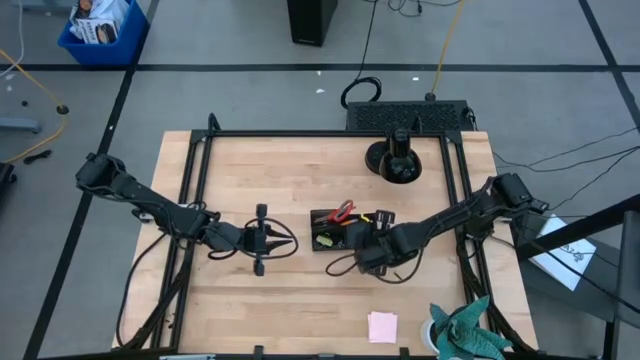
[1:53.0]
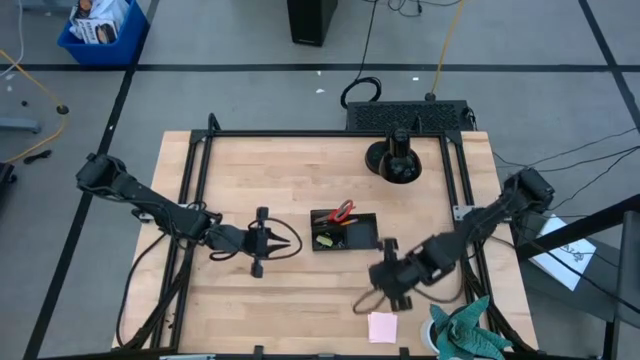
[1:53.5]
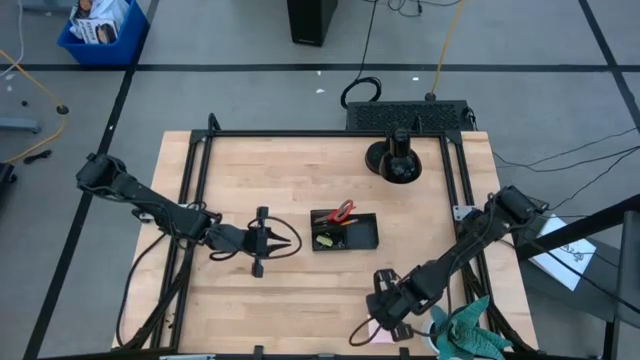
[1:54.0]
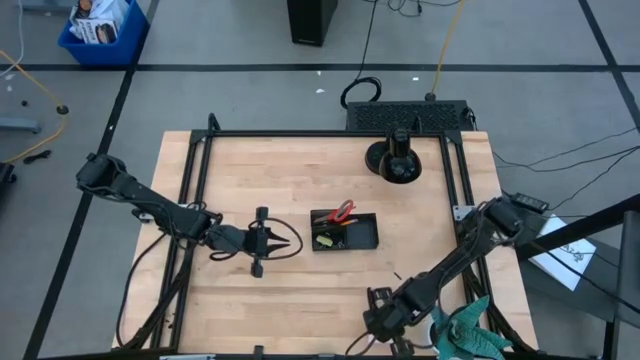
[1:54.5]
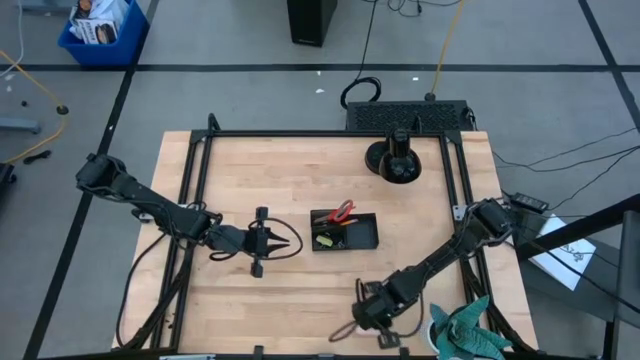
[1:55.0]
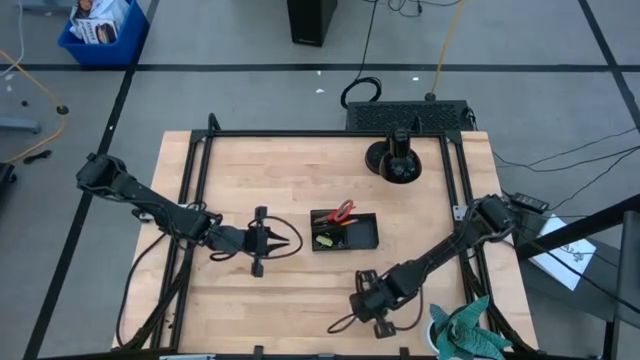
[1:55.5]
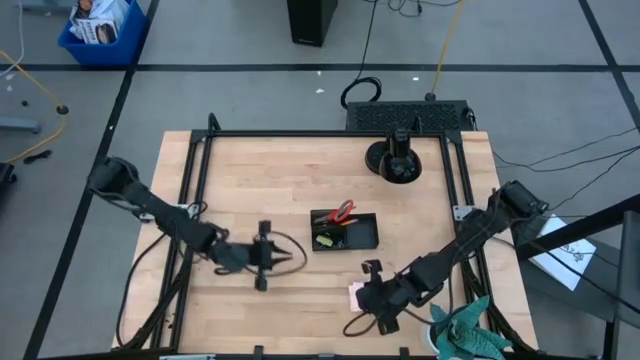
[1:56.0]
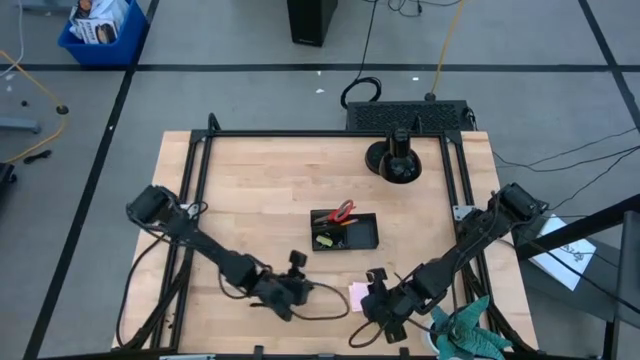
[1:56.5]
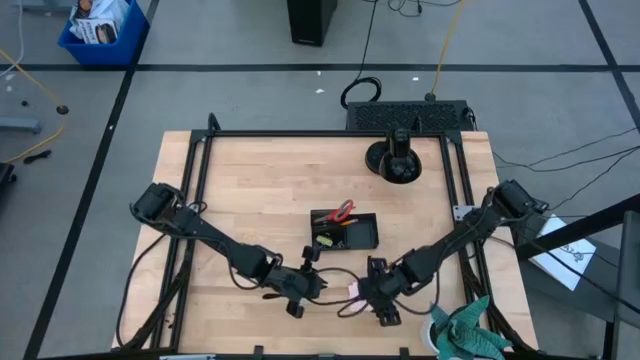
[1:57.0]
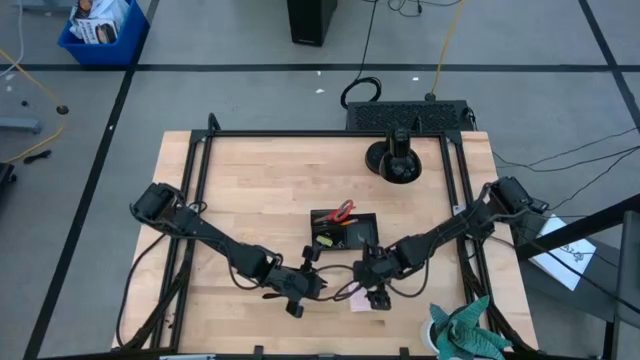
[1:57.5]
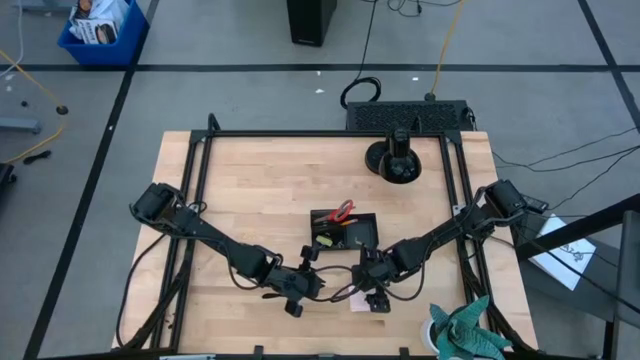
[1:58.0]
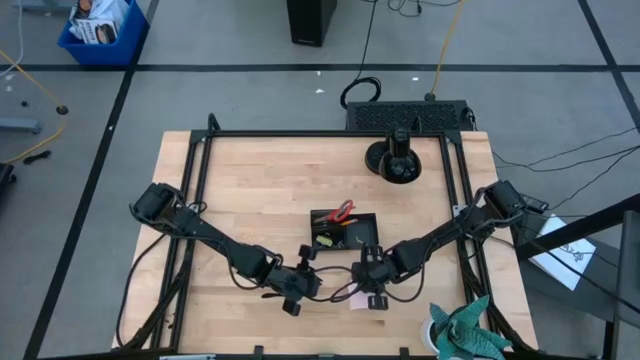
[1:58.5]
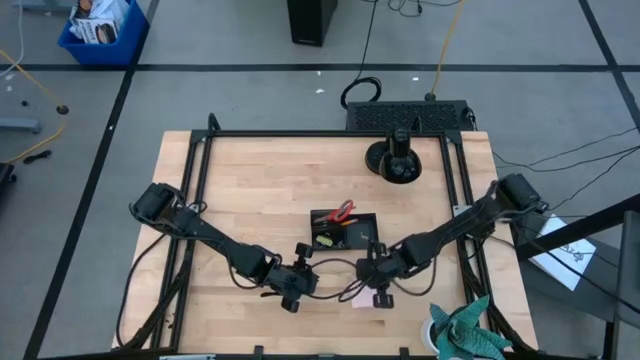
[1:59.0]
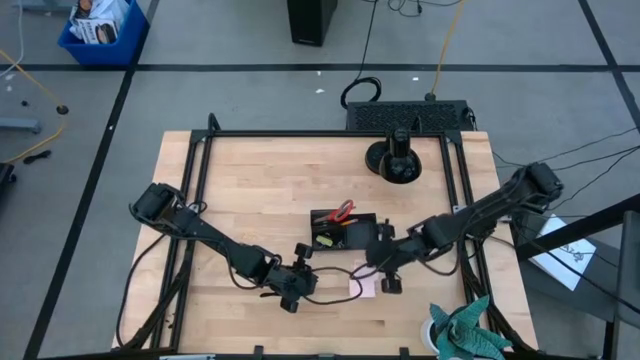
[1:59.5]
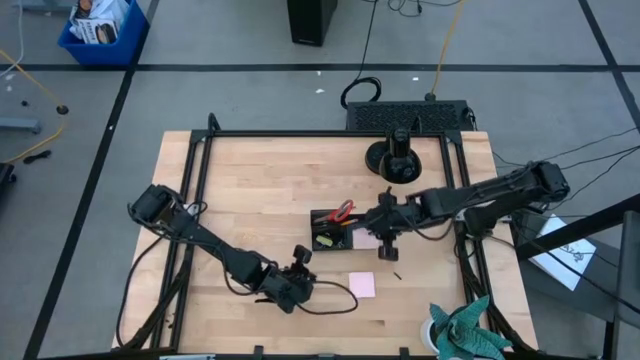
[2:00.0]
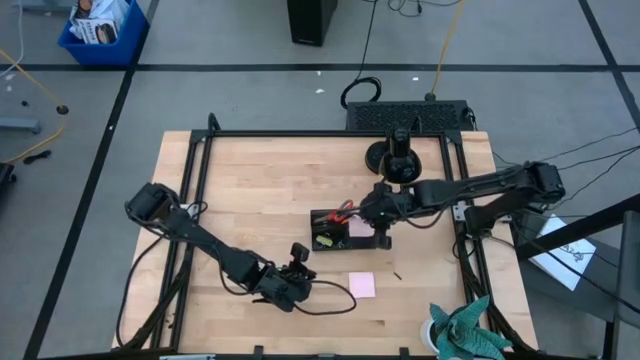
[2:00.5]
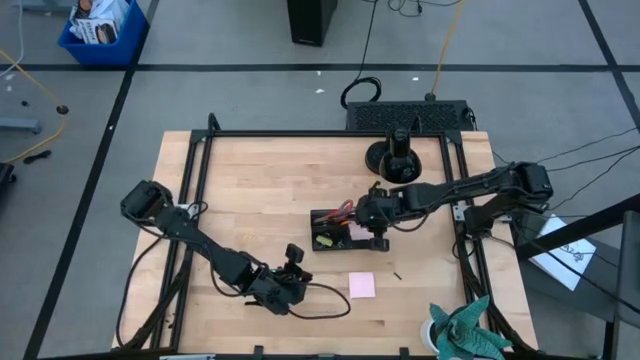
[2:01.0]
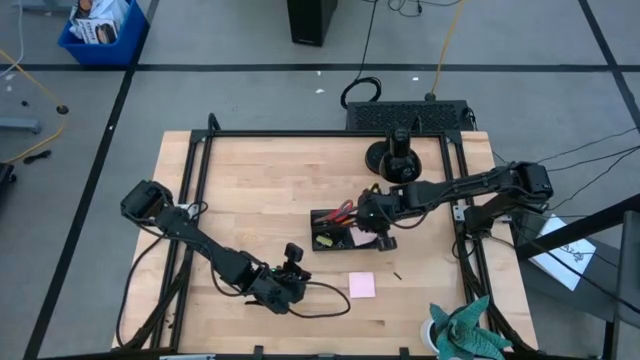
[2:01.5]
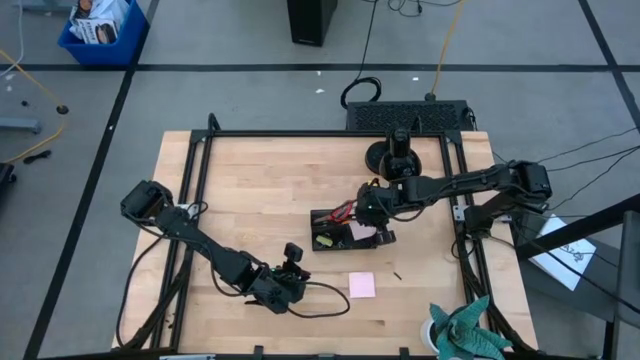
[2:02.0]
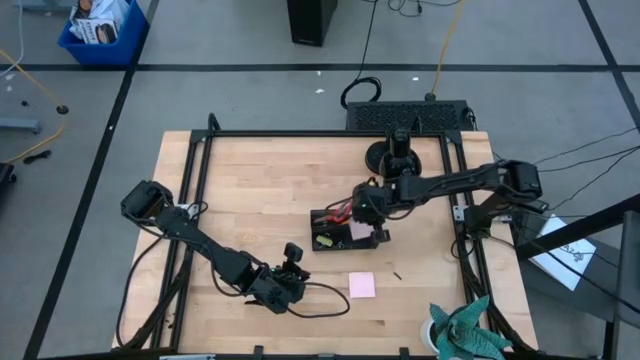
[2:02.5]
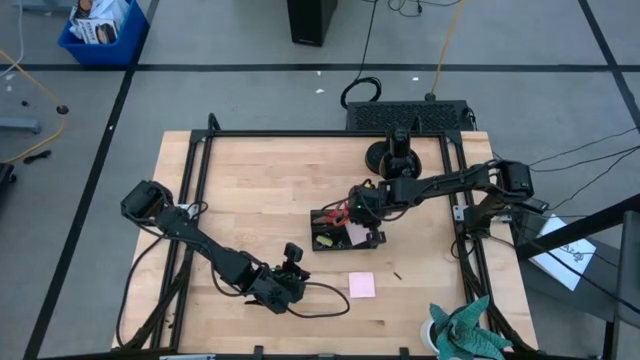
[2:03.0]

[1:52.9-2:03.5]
Task: Pick and place office supplies into organizer
Put the pink sticky notes into the black desk organizer

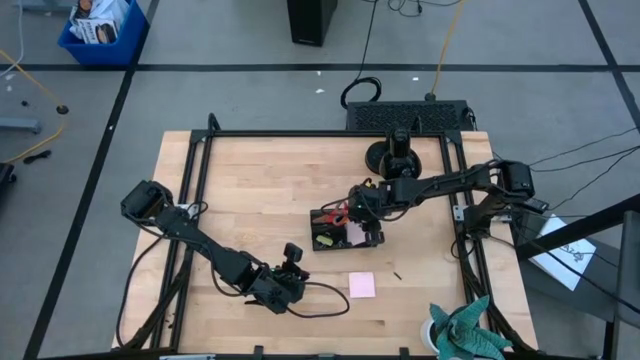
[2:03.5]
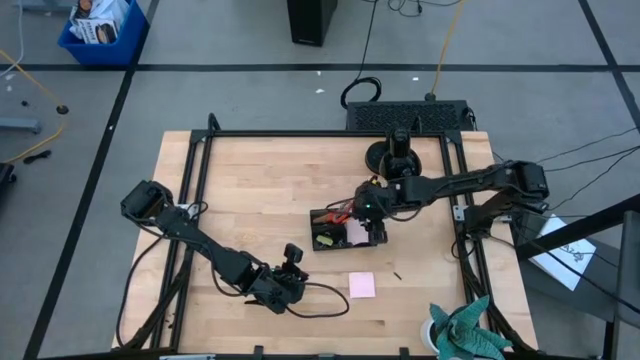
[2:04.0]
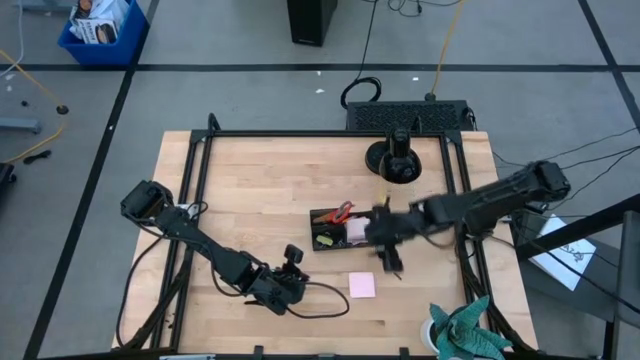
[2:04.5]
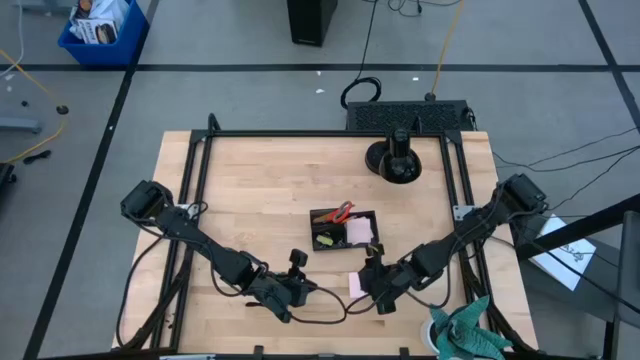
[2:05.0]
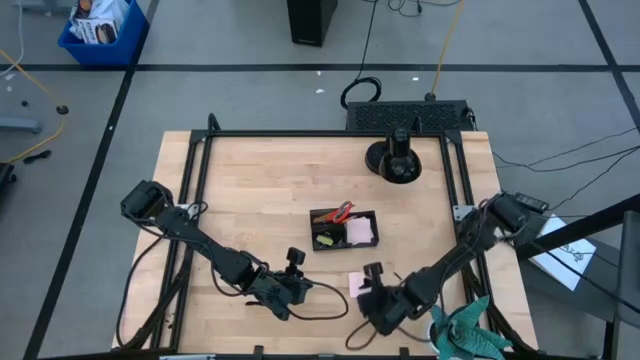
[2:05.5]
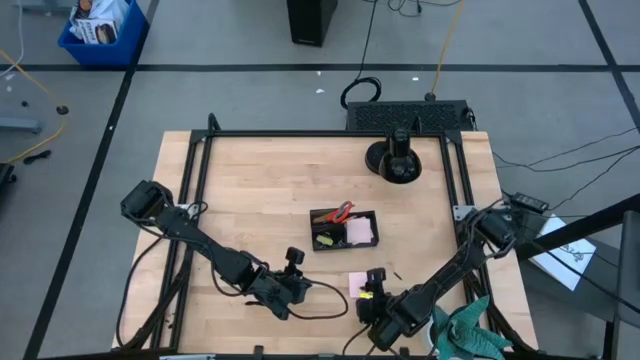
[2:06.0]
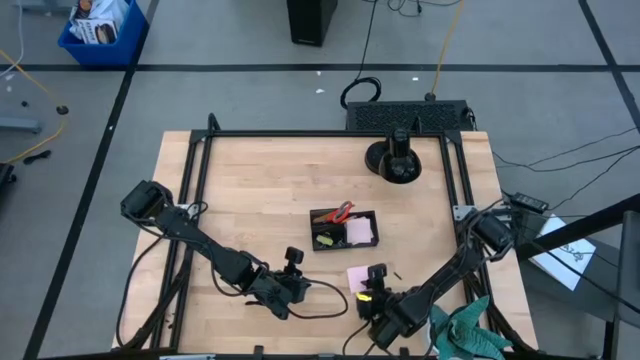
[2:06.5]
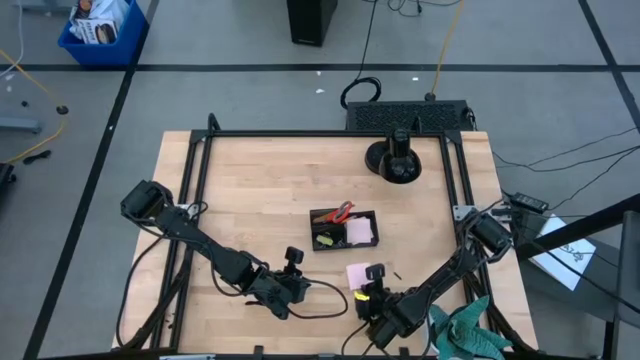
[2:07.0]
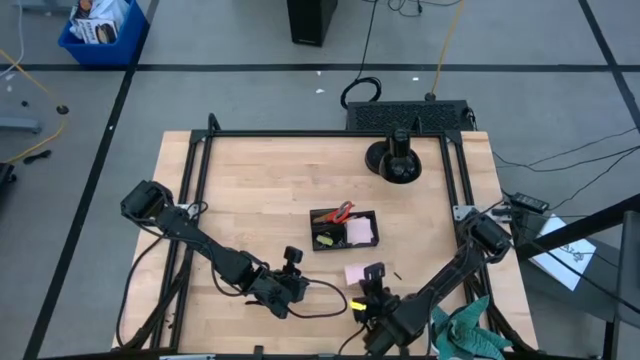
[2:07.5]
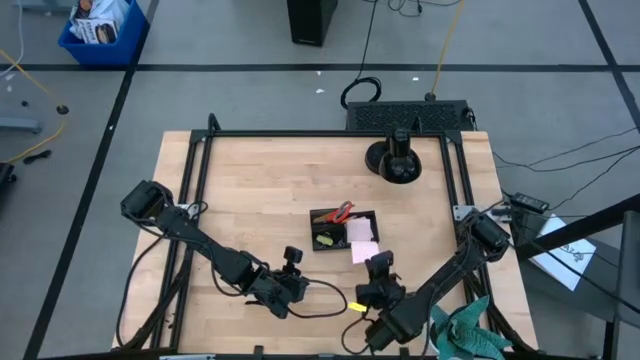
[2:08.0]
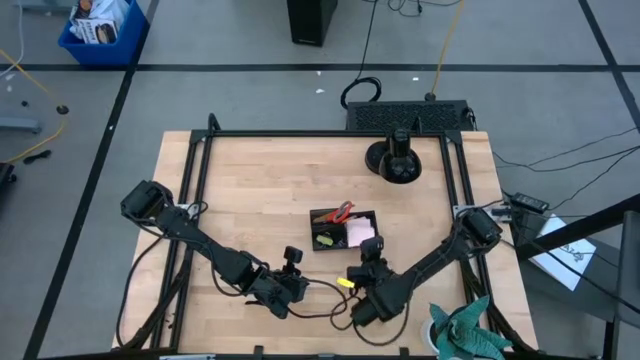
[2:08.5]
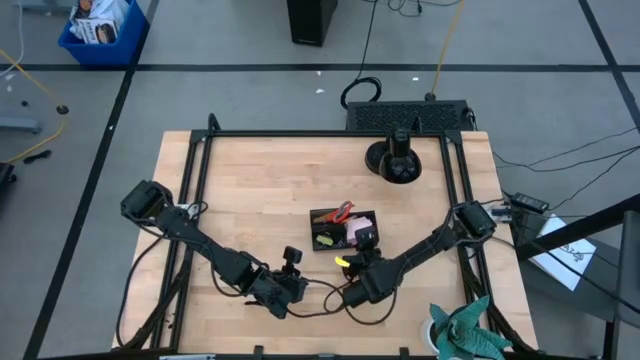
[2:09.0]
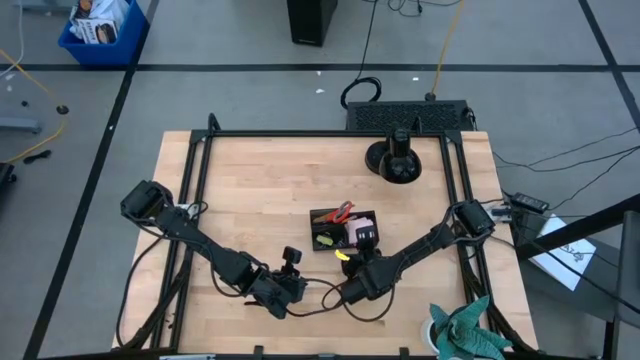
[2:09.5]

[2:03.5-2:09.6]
Put the pink sticky notes into the black desk organizer

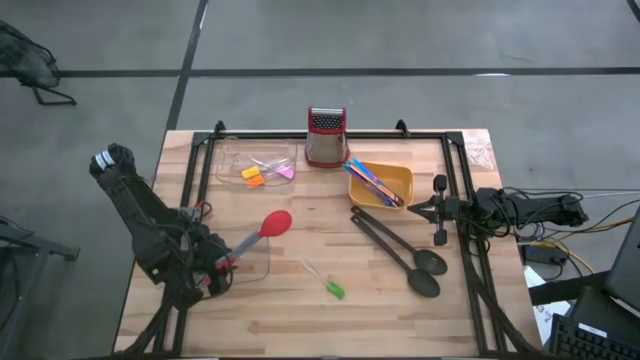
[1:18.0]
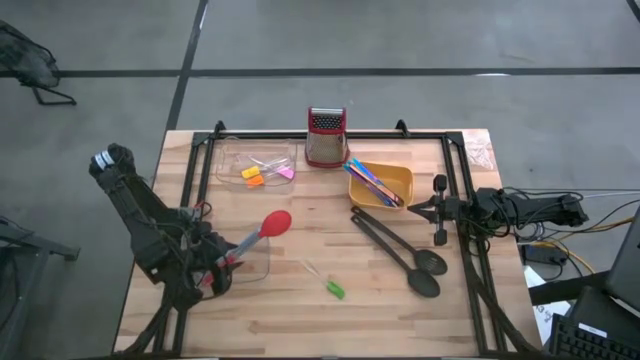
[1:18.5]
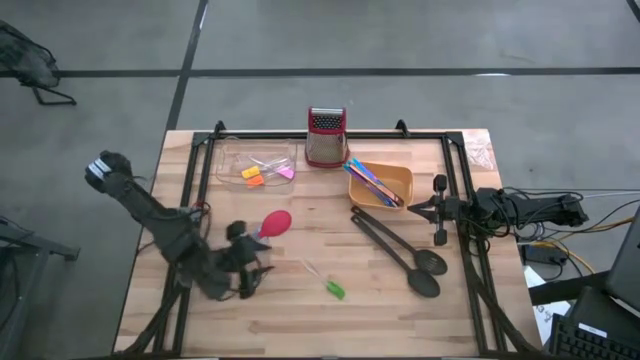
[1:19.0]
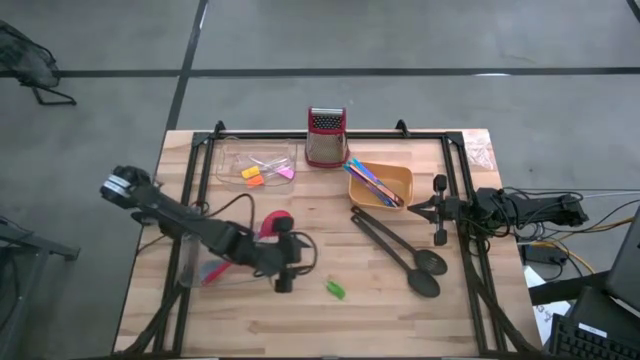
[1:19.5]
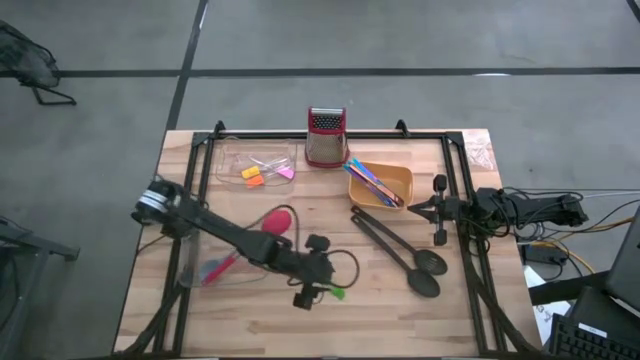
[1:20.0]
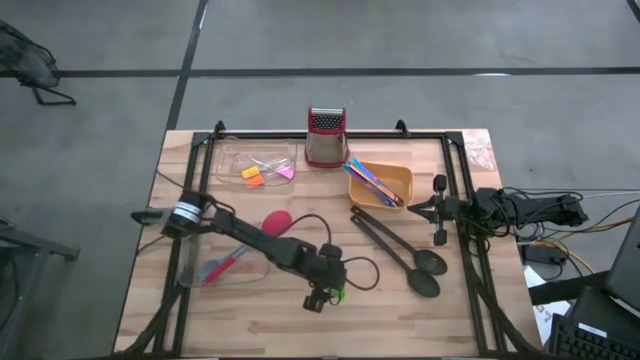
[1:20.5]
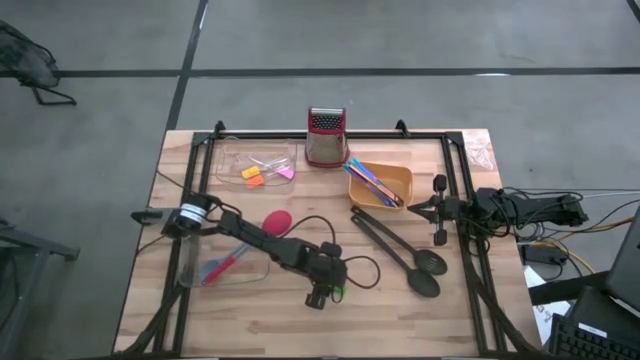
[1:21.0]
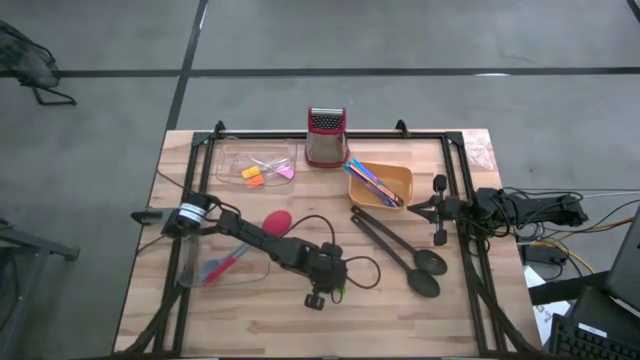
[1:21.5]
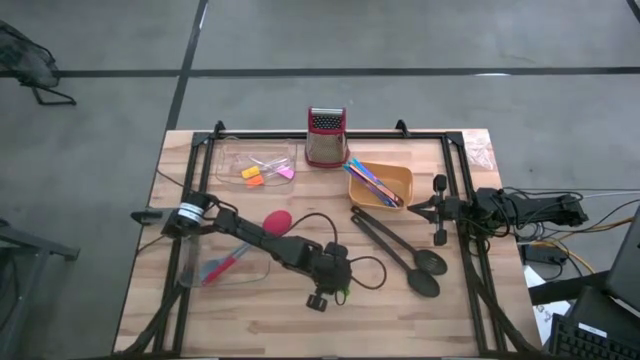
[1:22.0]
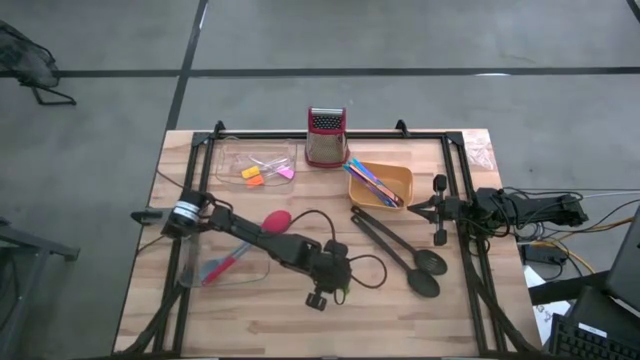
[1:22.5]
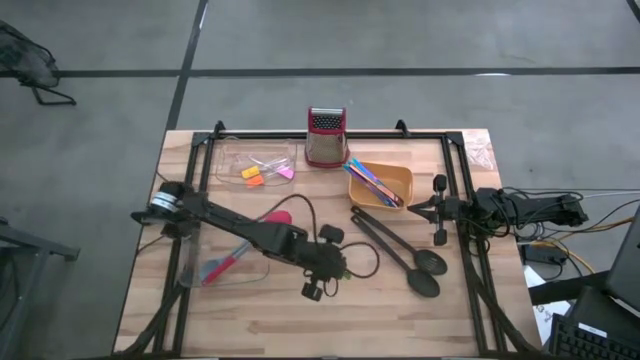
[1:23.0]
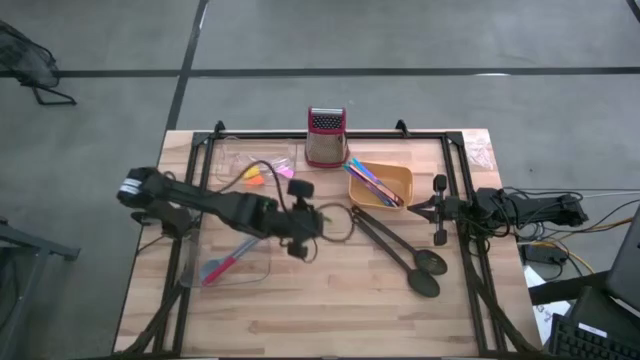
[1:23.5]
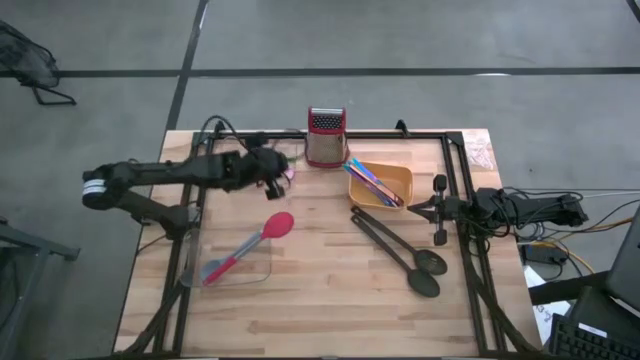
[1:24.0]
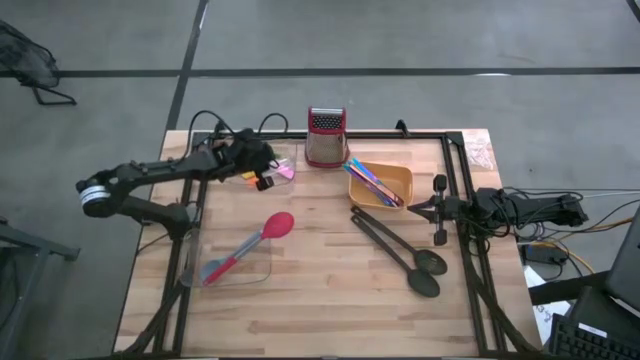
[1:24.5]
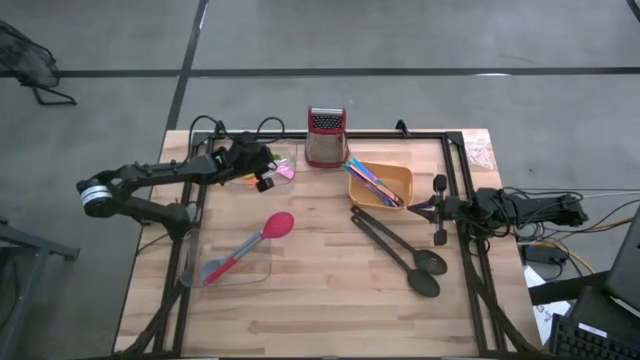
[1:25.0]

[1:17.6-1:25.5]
Task: Pick & Place Kitchen Items
Put the green spatula into the top transparent bin
